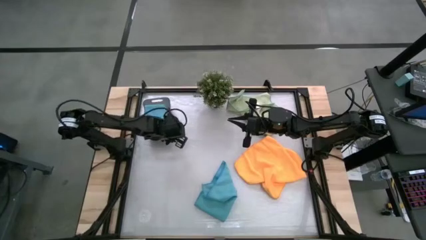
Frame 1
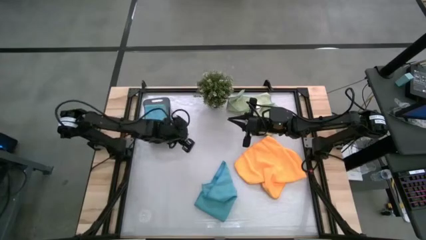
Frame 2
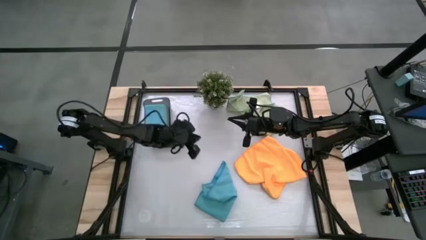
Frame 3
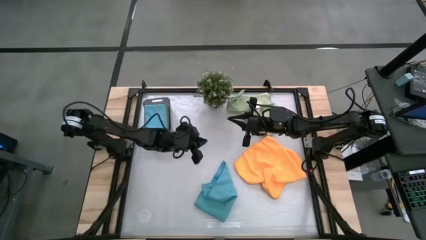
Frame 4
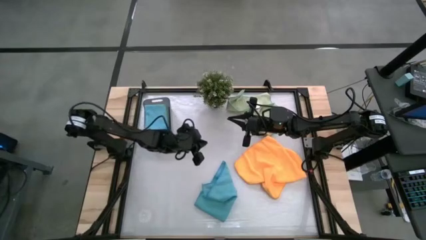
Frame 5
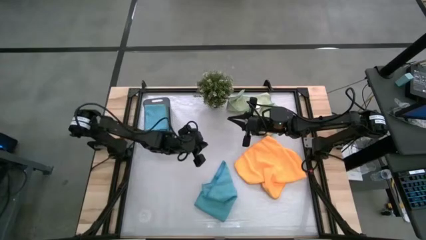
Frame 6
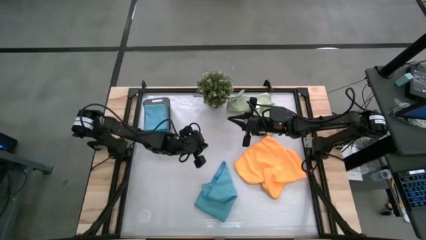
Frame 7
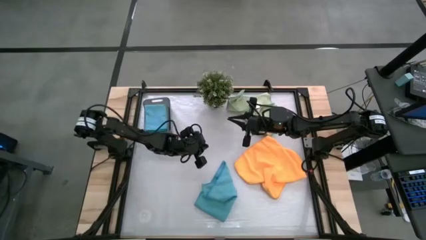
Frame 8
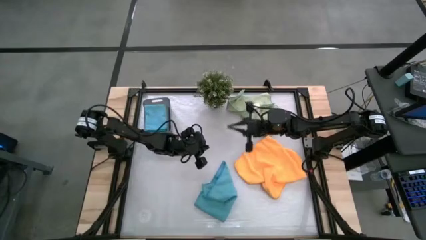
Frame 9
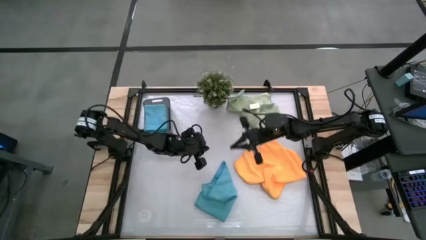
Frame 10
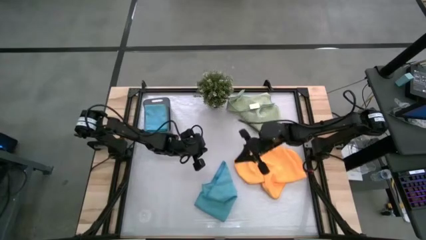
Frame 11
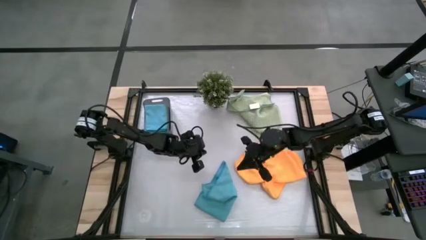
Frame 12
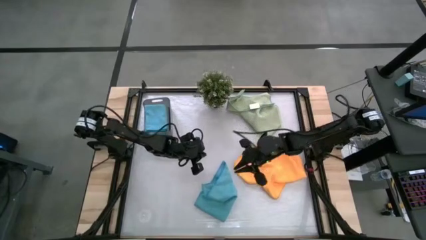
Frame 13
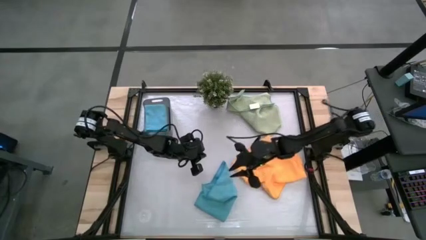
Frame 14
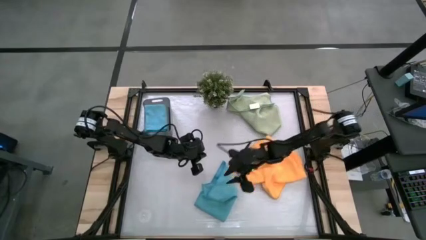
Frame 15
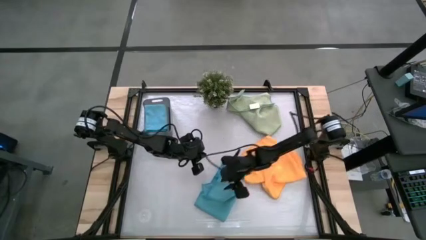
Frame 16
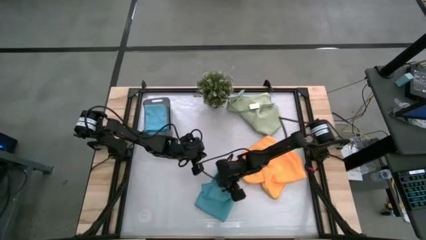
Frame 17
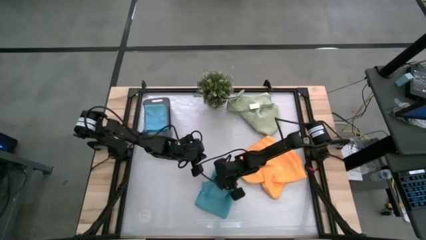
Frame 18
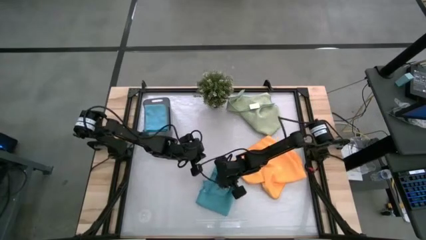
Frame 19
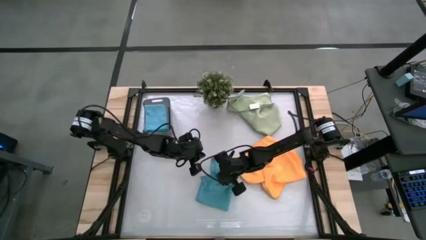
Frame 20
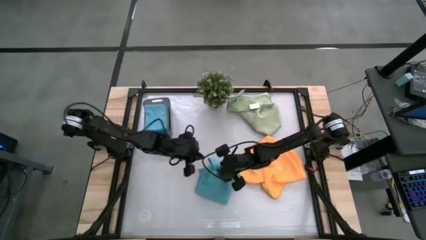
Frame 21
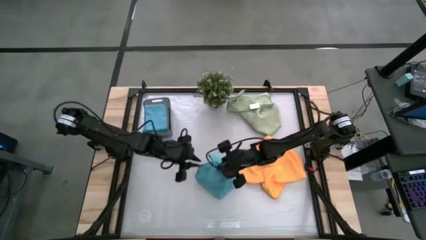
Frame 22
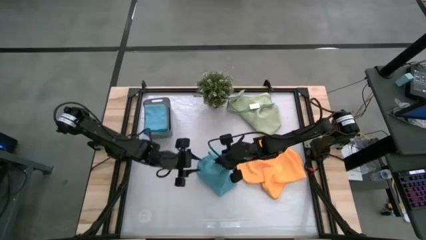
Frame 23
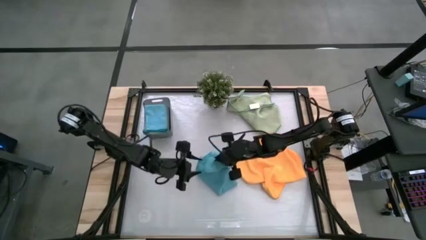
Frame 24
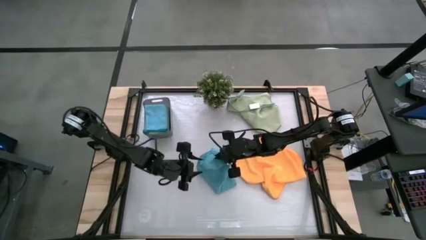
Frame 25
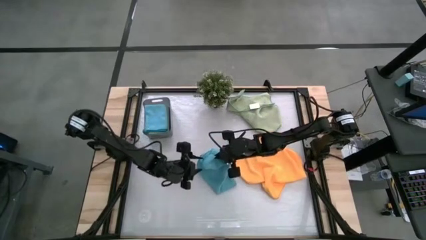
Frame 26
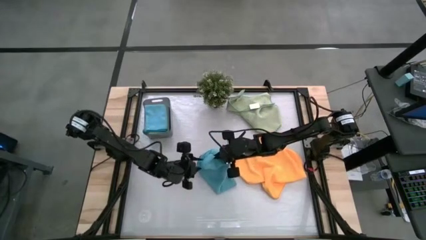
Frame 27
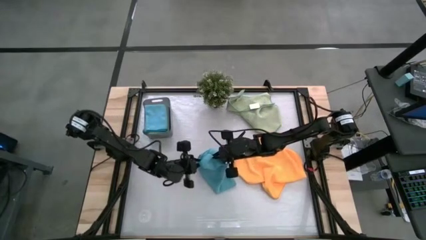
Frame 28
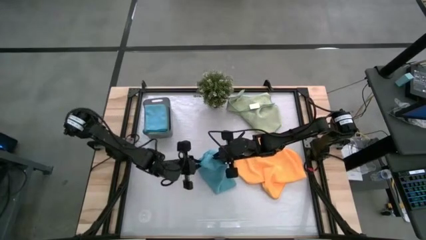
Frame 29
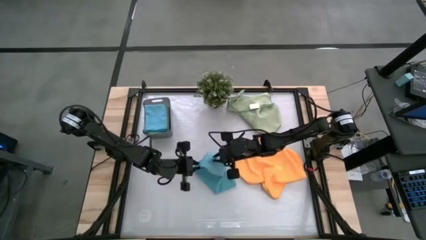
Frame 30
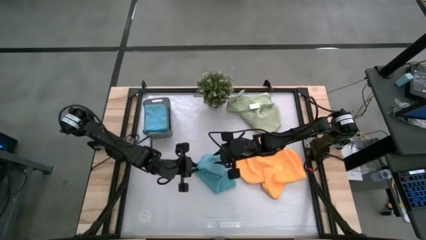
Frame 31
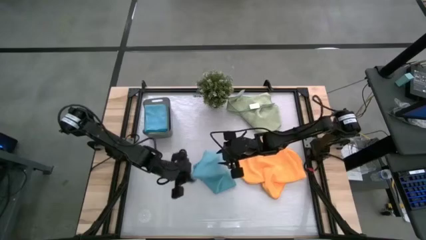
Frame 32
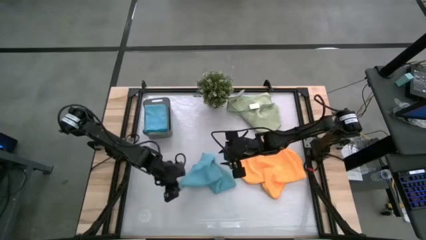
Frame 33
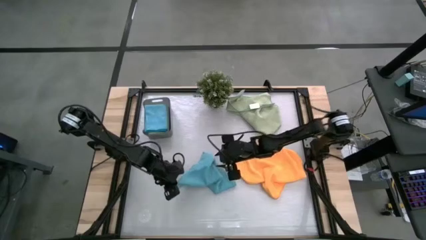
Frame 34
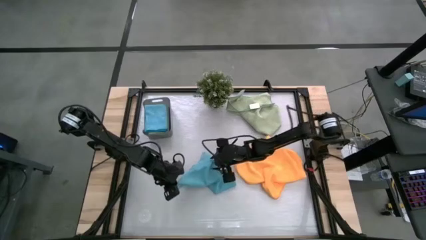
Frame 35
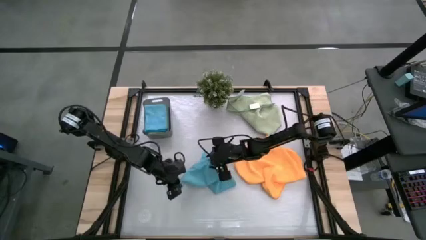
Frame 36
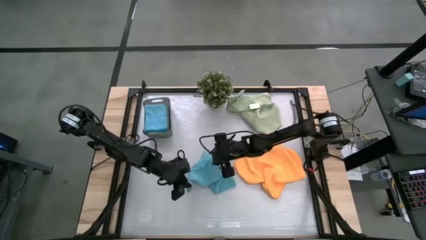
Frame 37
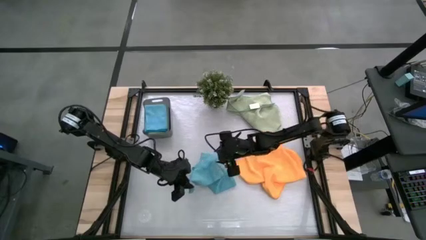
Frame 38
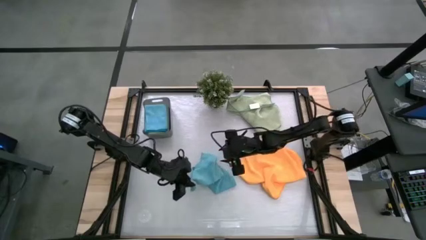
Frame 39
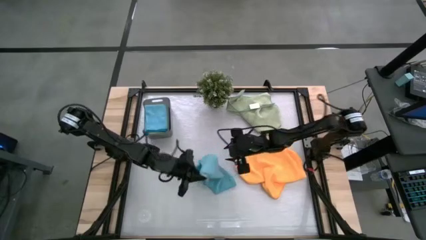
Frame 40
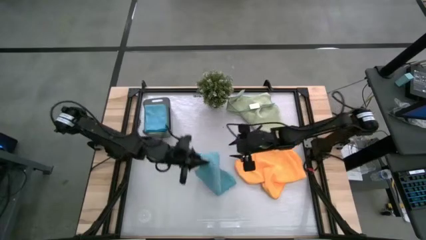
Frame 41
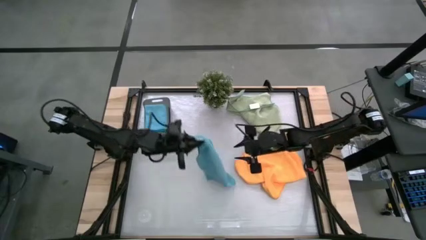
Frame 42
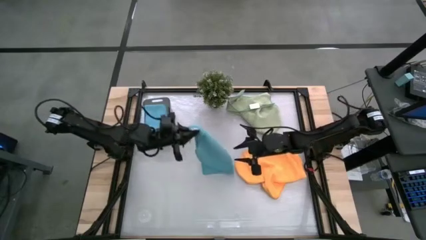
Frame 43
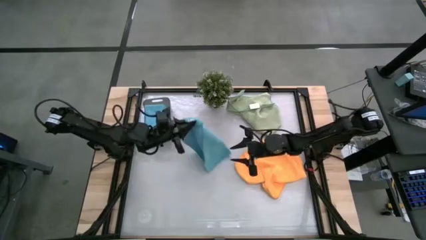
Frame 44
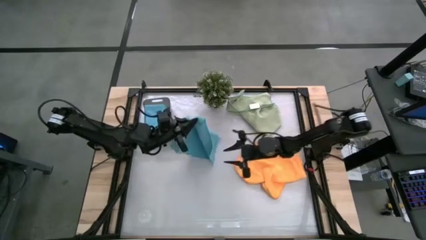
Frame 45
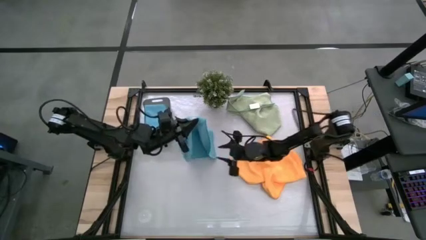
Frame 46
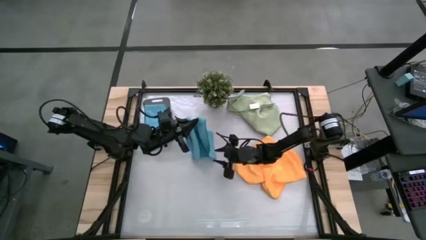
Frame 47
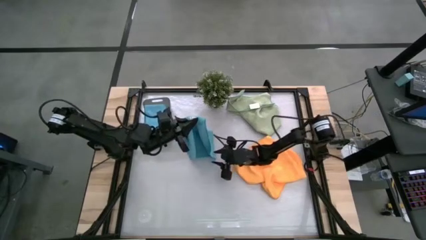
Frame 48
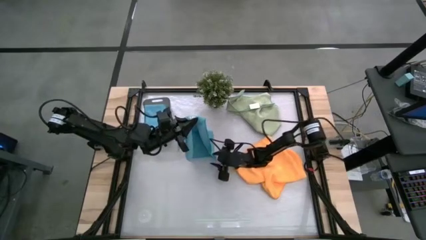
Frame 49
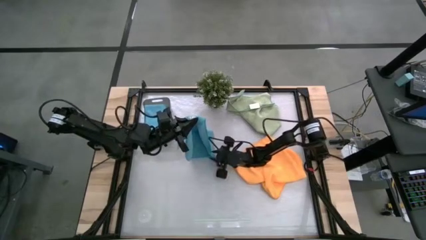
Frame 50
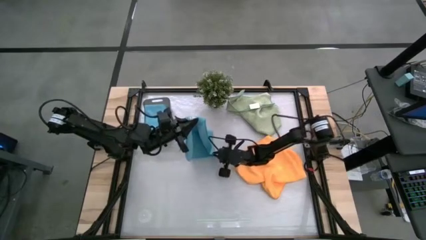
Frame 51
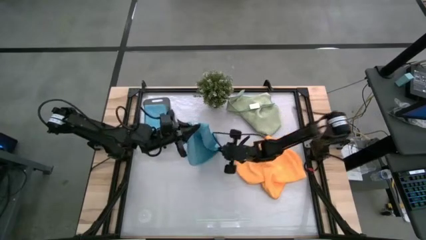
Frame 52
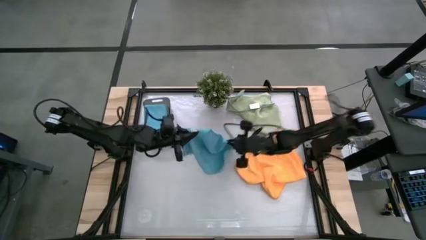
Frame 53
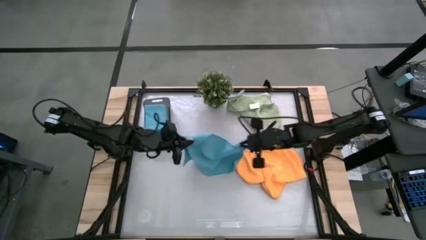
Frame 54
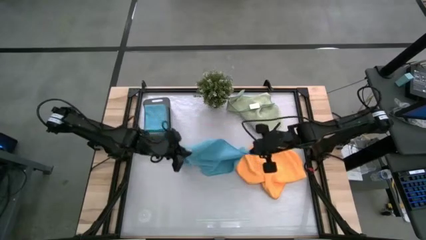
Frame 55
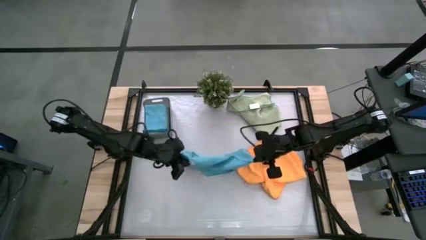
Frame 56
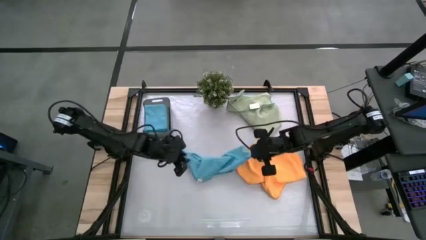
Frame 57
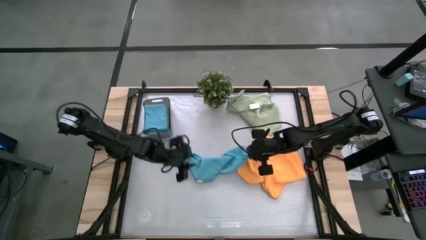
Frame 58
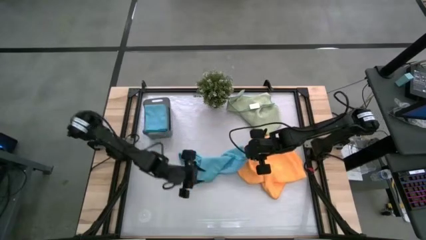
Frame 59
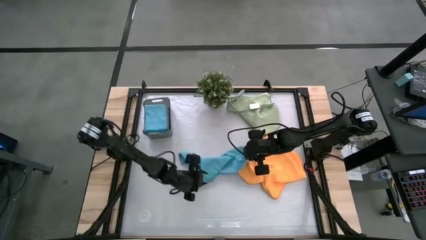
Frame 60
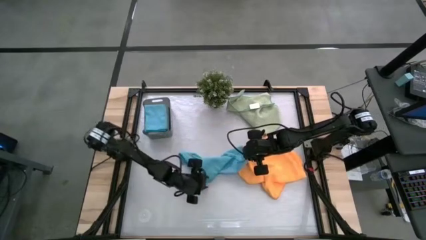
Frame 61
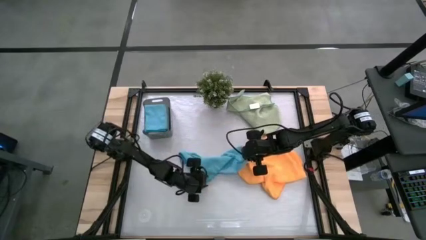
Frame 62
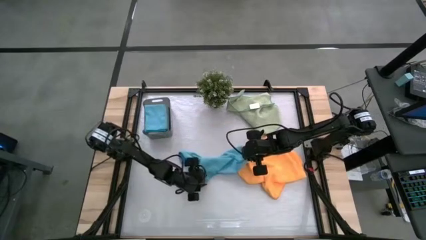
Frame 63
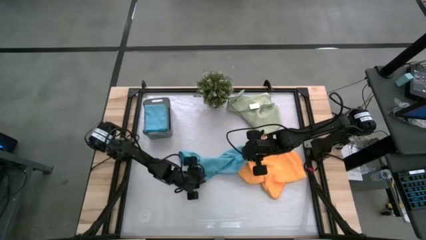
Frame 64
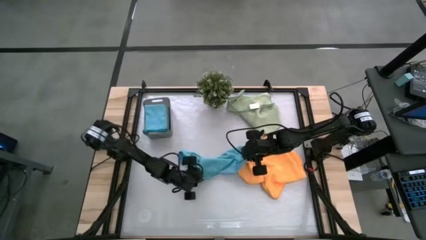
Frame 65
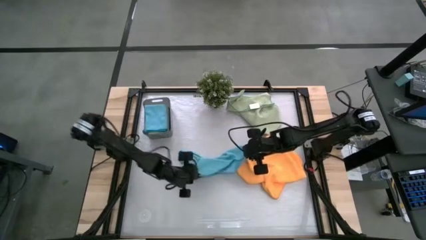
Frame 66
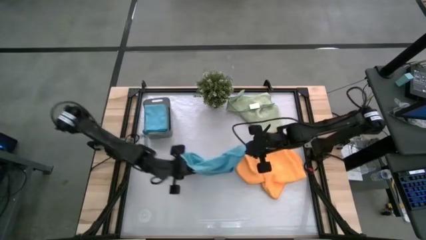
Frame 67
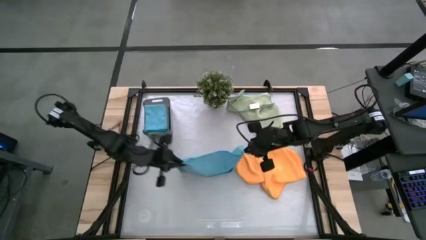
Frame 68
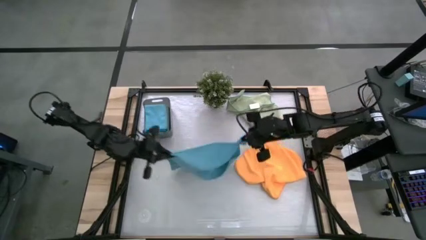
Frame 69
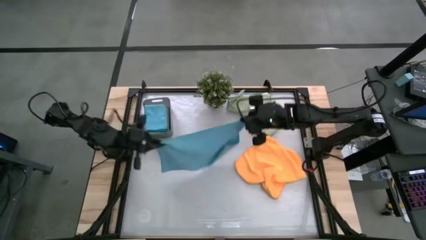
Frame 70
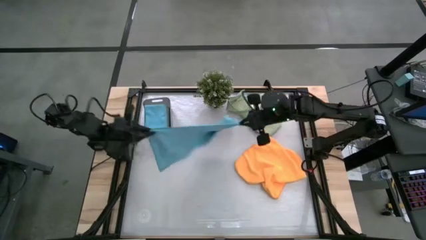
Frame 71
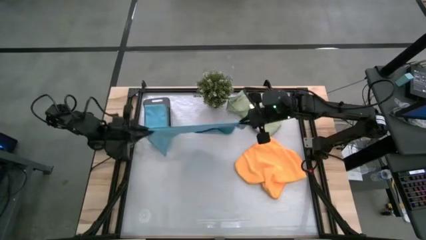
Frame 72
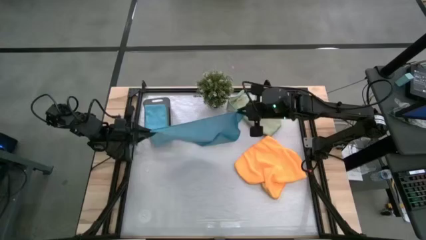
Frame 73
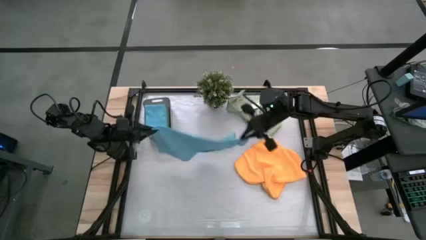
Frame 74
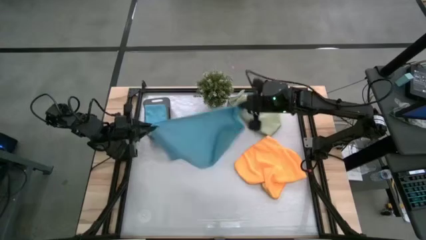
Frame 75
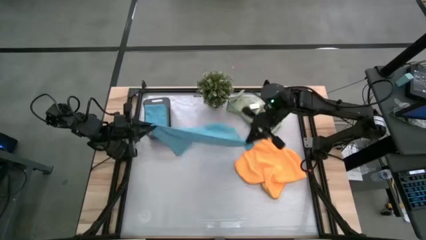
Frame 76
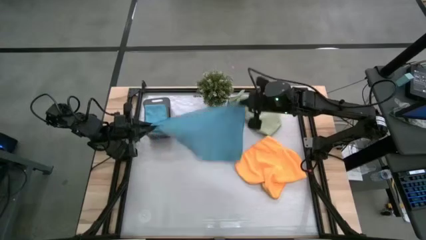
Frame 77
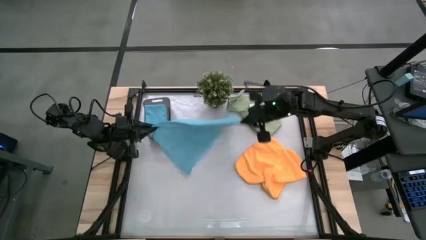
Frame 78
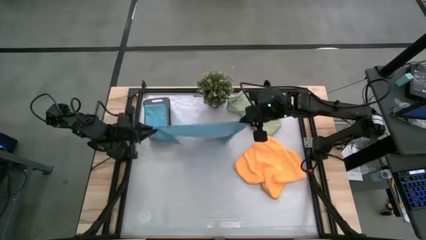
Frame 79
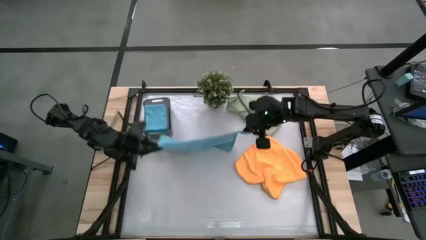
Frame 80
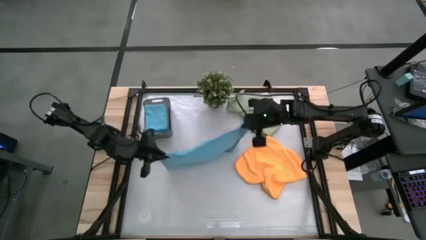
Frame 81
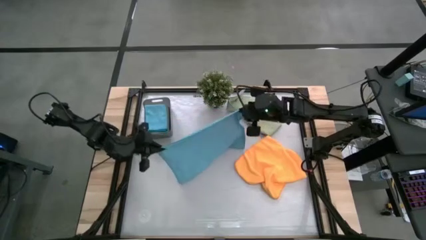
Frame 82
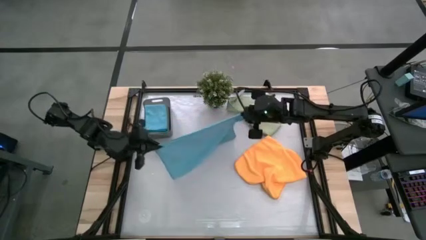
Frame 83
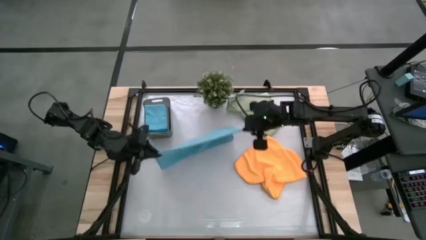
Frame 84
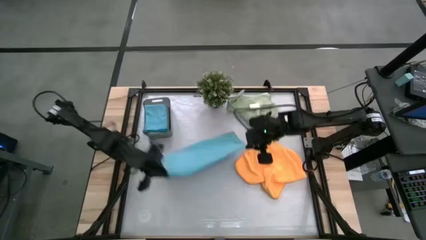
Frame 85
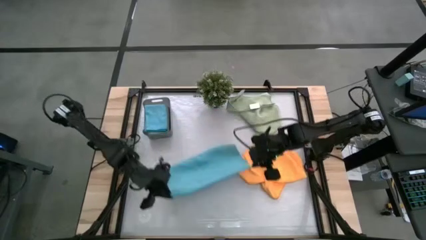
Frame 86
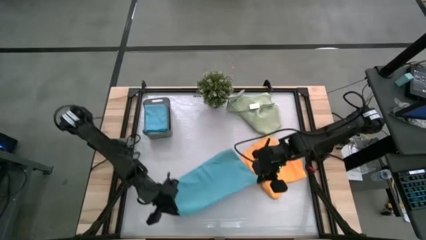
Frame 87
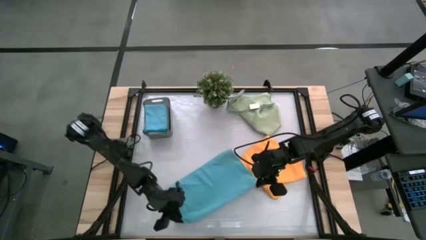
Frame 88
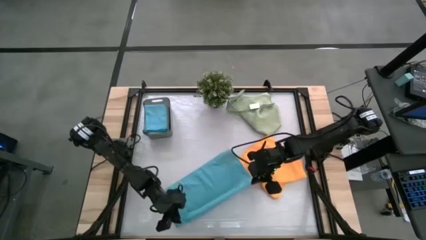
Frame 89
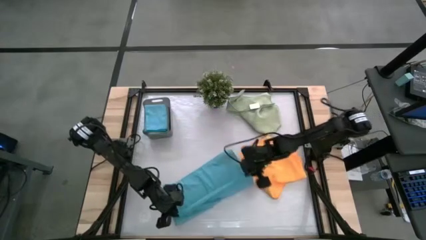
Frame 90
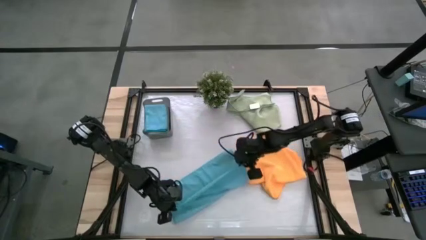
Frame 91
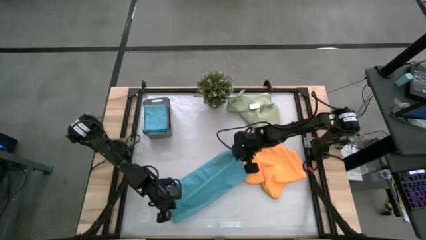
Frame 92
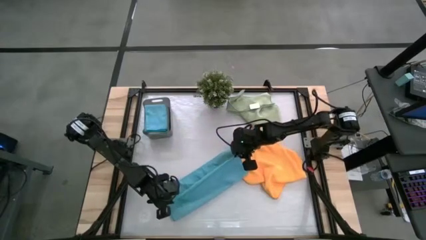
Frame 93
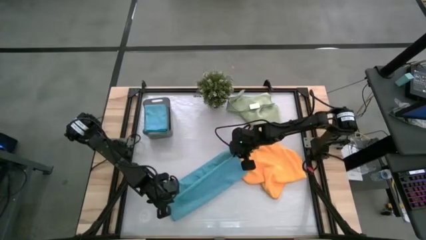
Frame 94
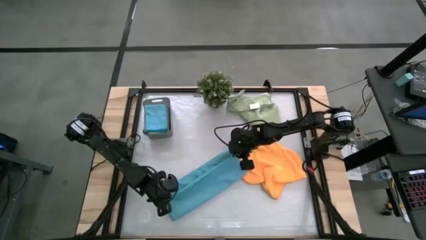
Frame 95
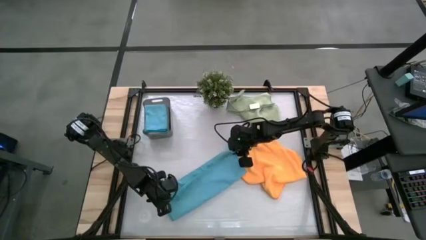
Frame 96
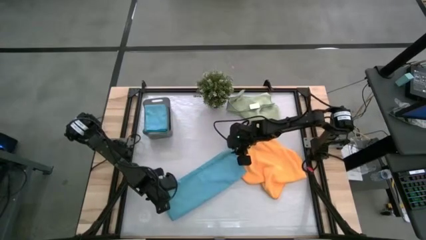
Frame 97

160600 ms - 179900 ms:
Task: Fold microfiber towels
Fold the blue microfiber cloth
